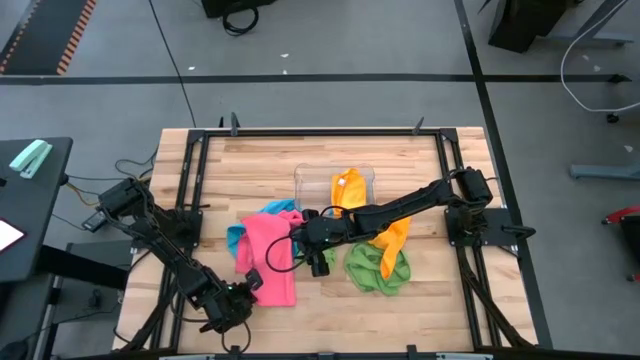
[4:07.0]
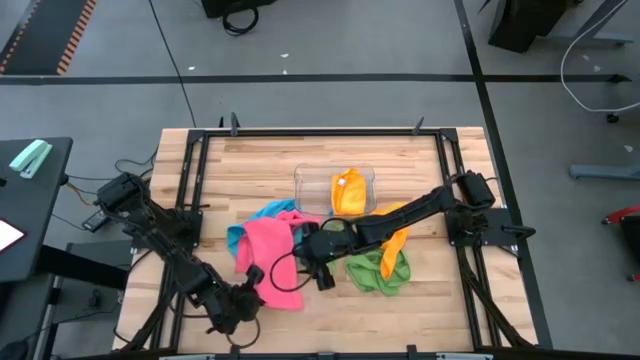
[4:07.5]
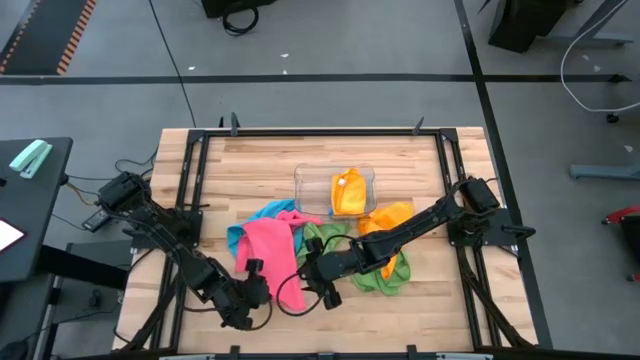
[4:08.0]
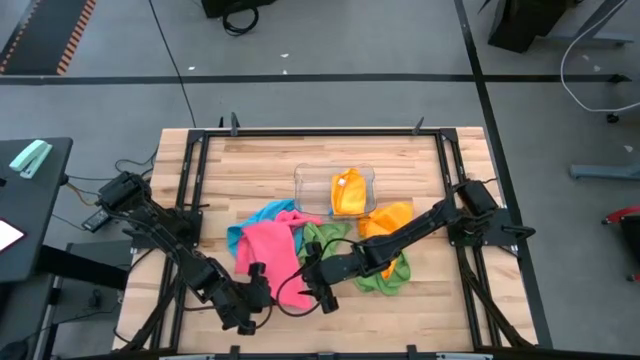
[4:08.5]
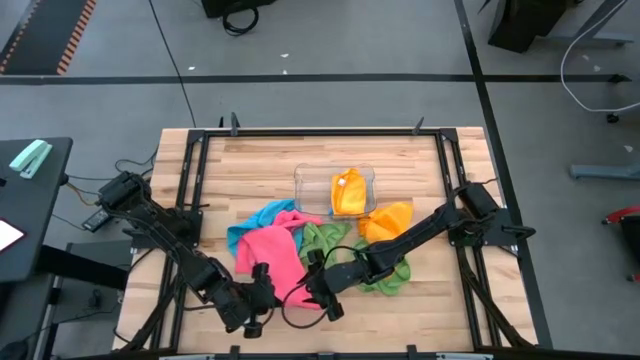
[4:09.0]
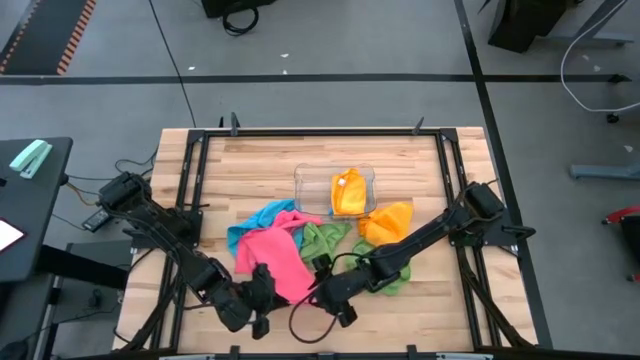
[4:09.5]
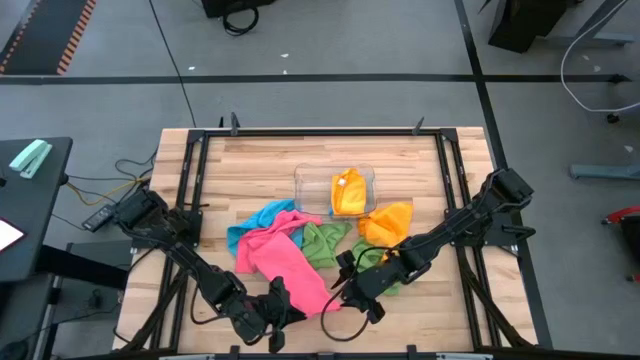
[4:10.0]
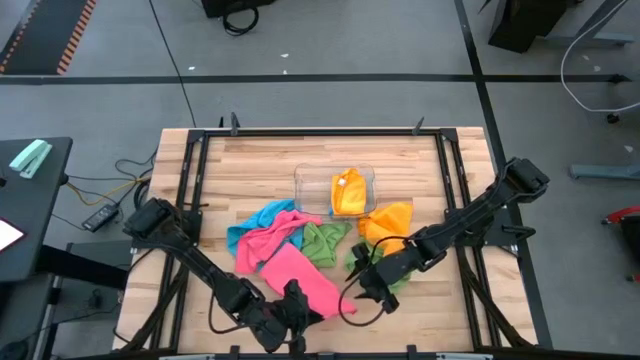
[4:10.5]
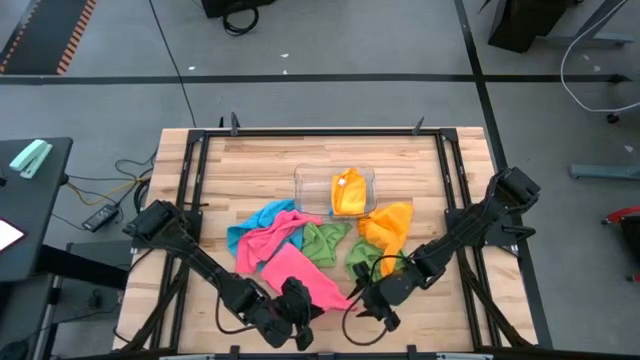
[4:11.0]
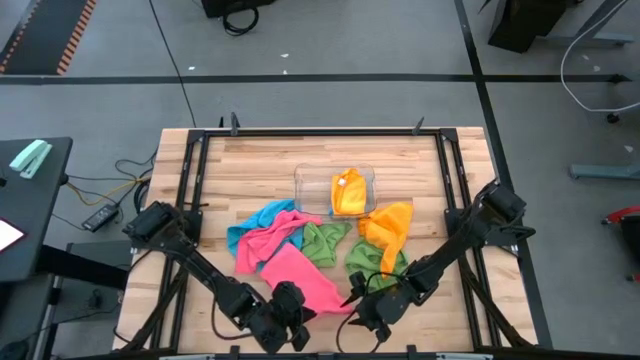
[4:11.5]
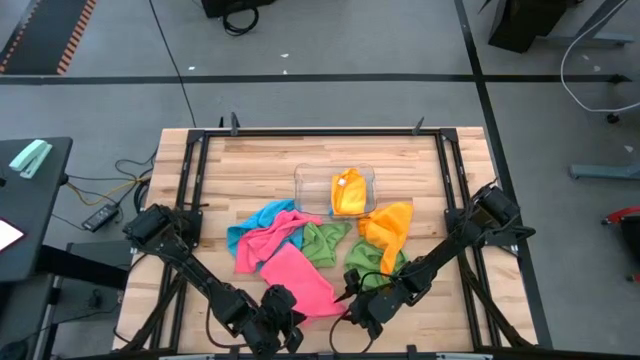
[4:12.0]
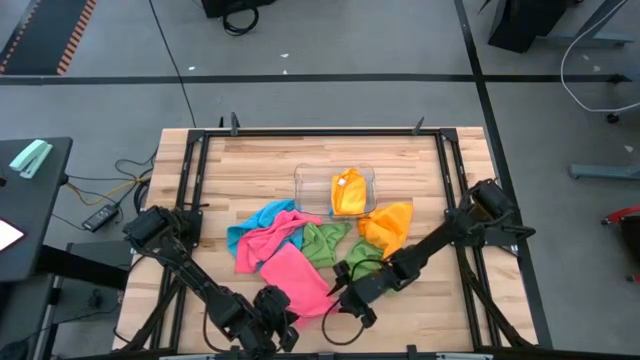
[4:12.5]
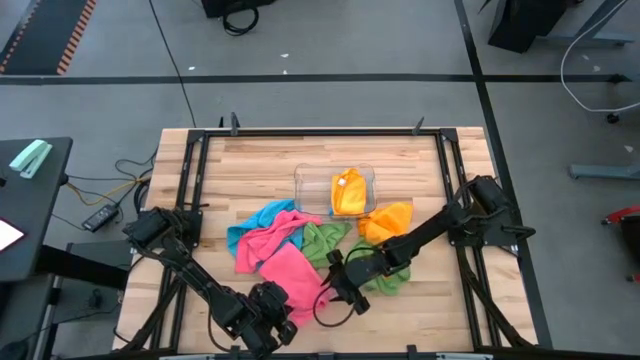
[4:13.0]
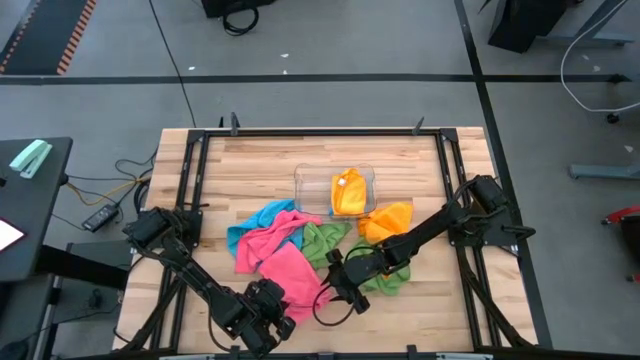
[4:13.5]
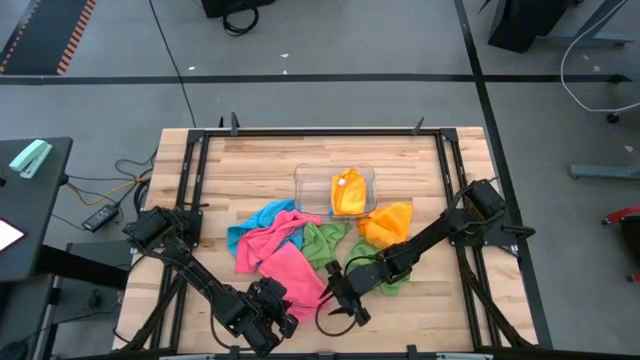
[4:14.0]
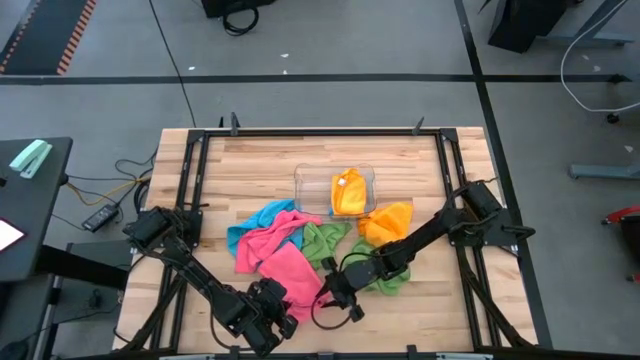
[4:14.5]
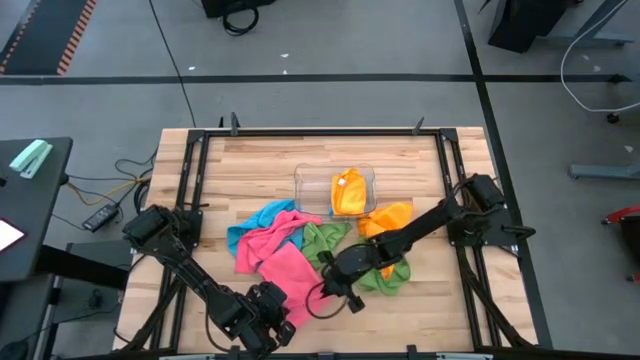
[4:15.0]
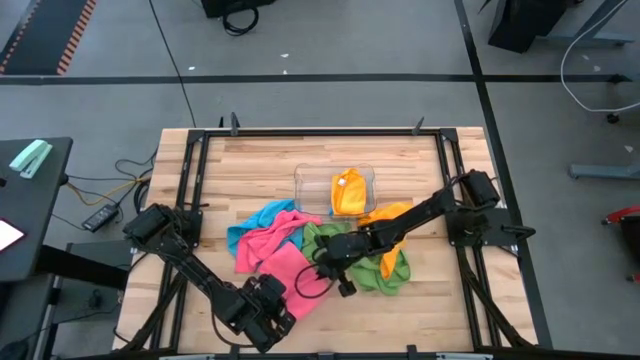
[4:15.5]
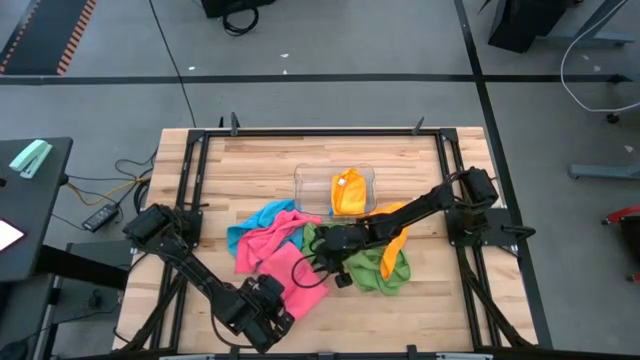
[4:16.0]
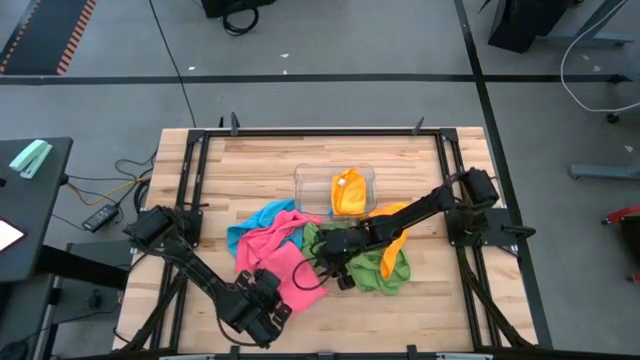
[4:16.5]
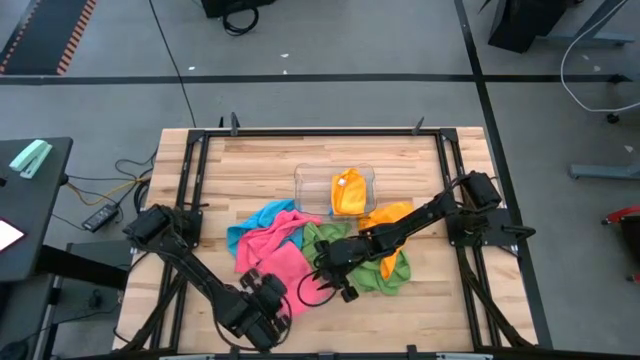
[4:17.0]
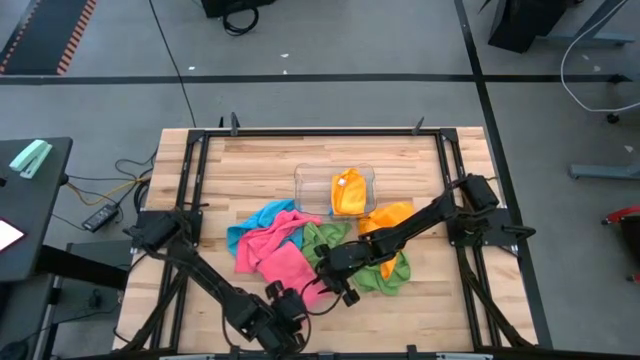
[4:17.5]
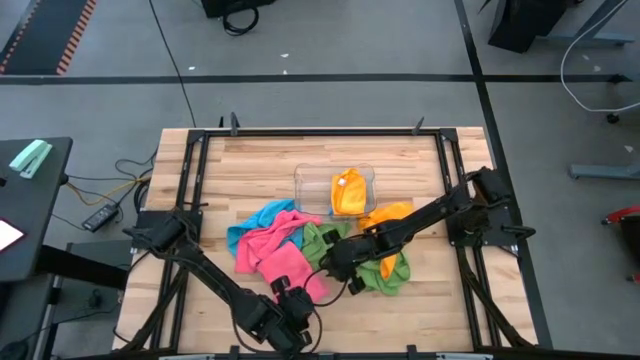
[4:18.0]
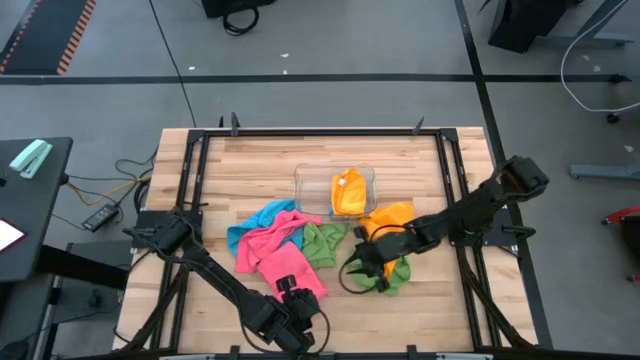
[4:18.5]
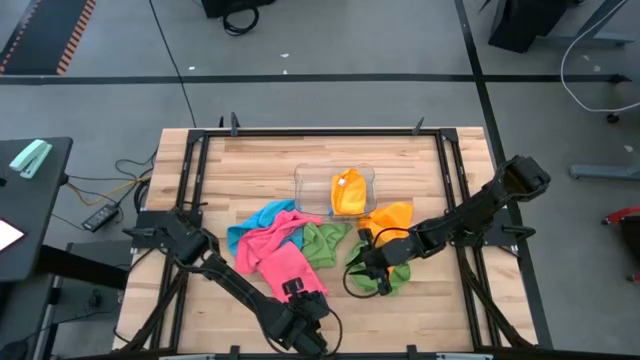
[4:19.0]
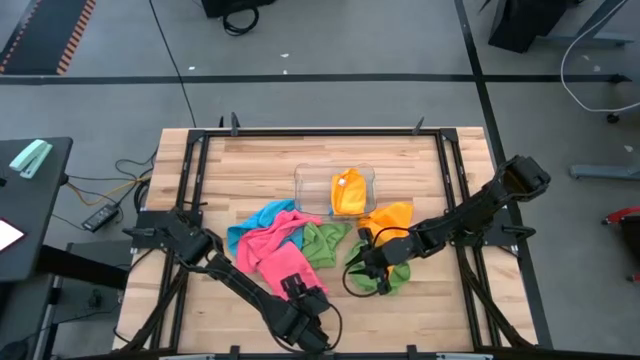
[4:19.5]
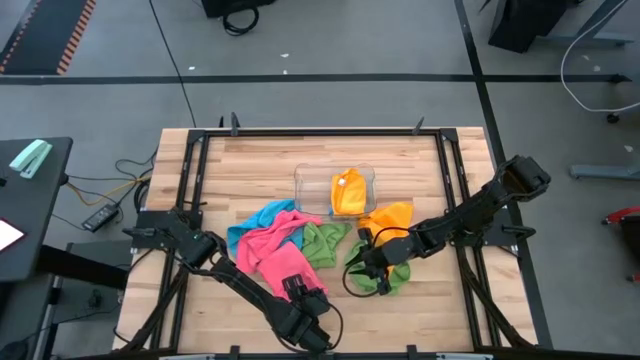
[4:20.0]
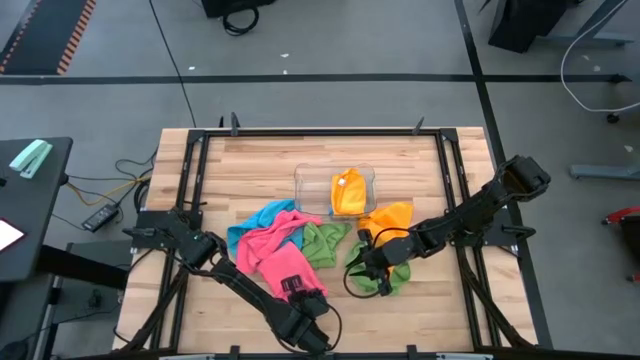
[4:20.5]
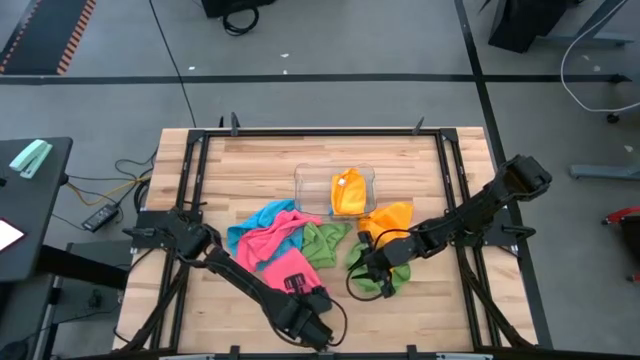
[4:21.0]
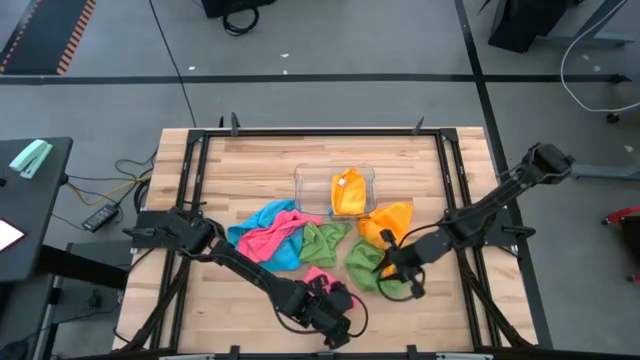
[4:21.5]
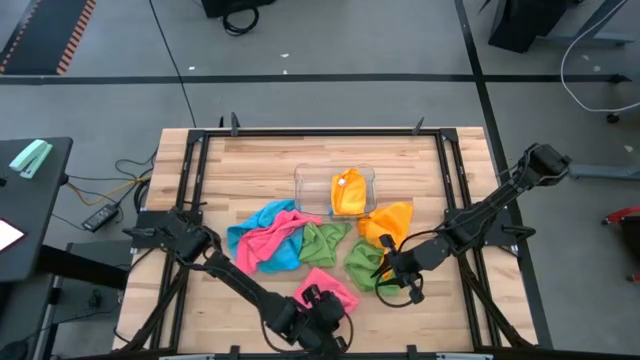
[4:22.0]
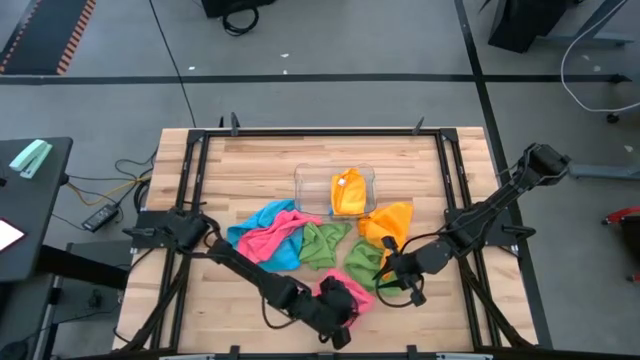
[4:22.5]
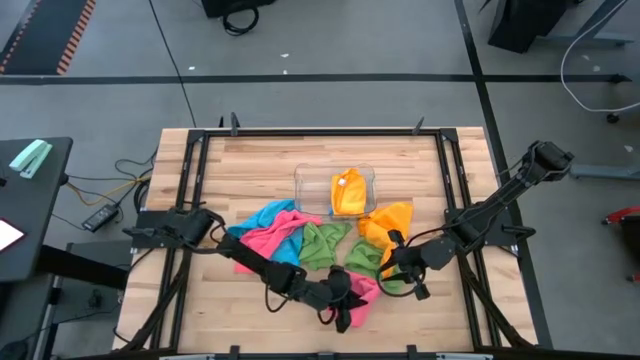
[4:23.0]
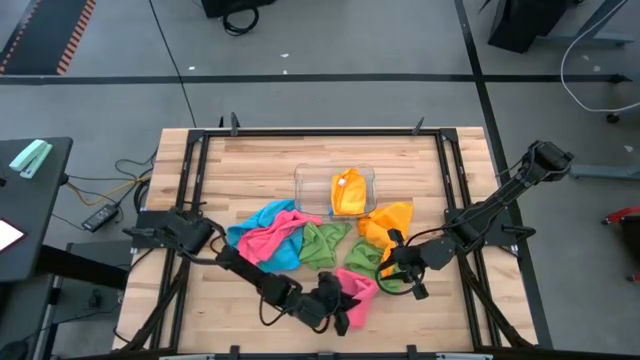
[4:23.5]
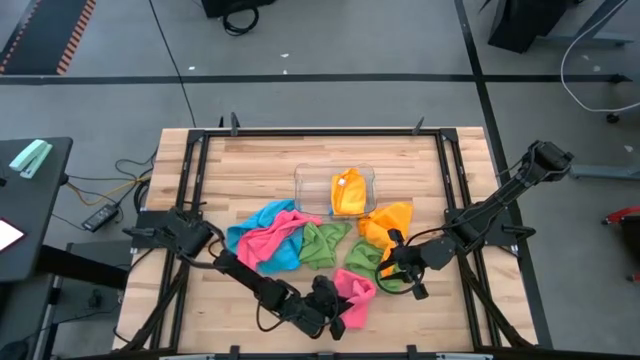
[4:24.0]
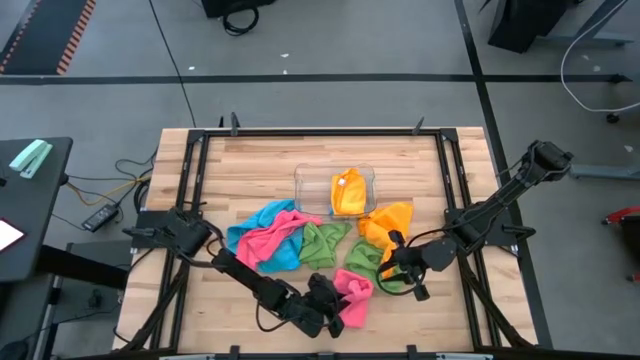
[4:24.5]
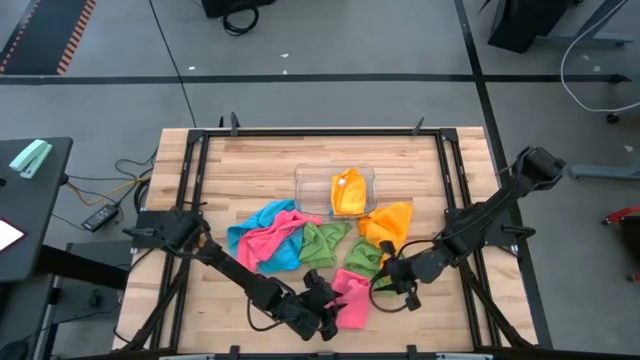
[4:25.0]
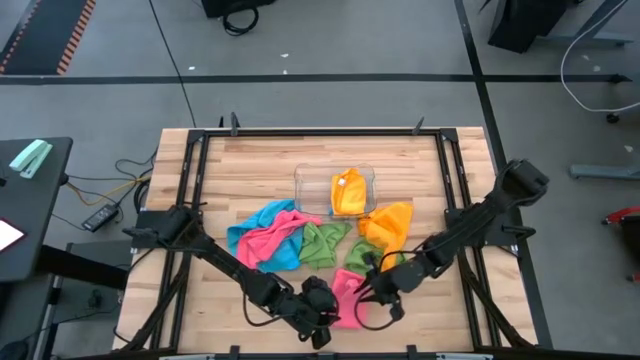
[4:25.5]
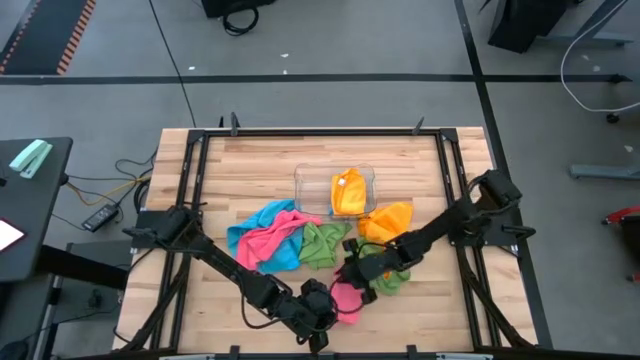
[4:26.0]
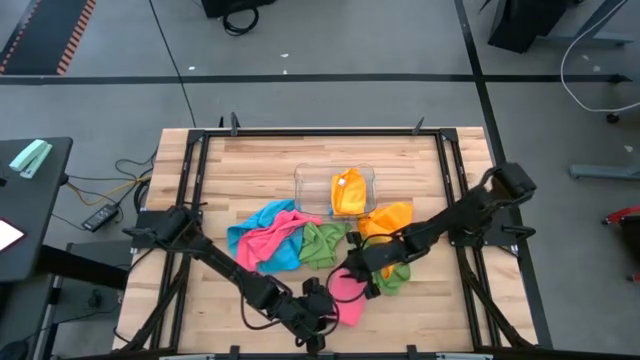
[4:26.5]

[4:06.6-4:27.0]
Task: Fold microfiber towels
Fold the bottom pink microfiber cloth

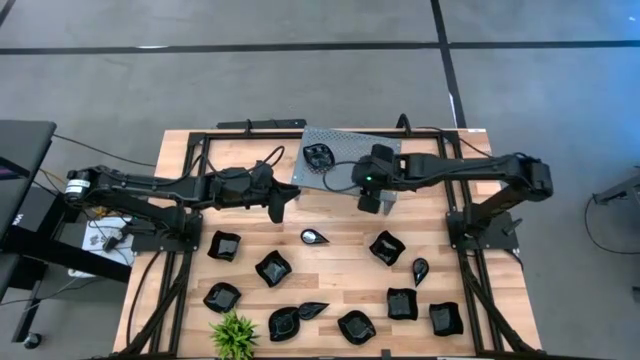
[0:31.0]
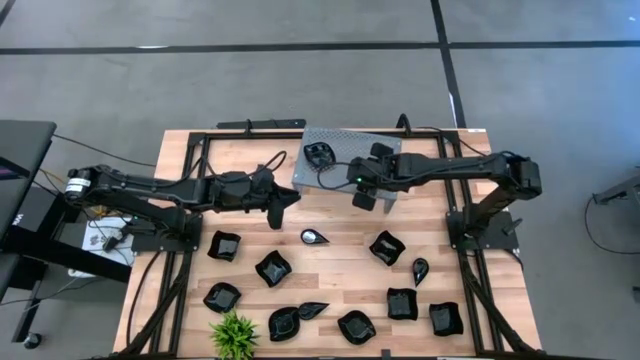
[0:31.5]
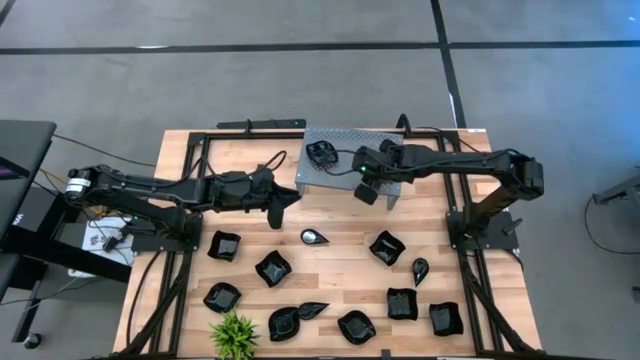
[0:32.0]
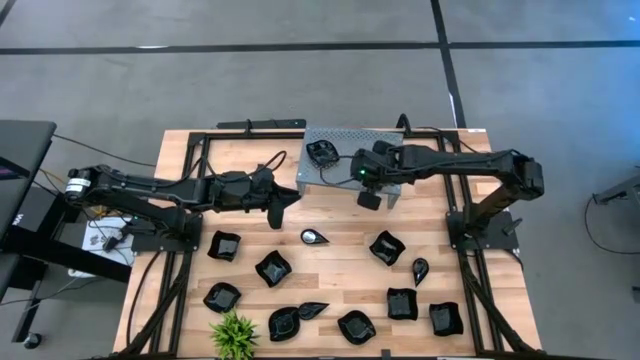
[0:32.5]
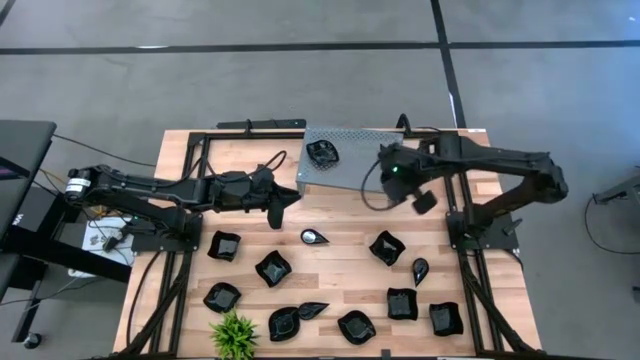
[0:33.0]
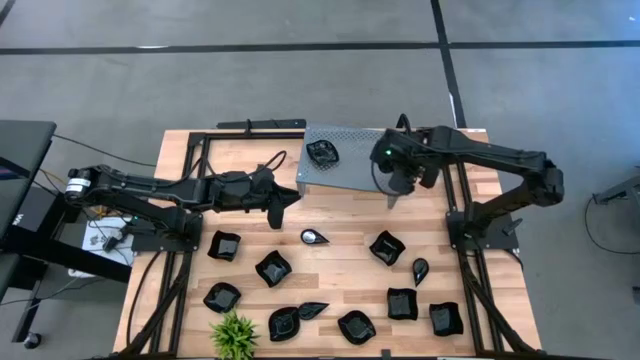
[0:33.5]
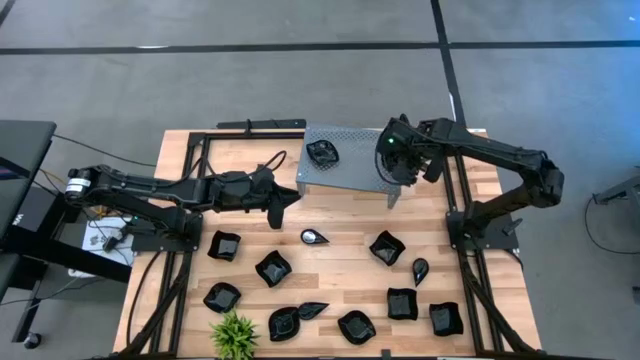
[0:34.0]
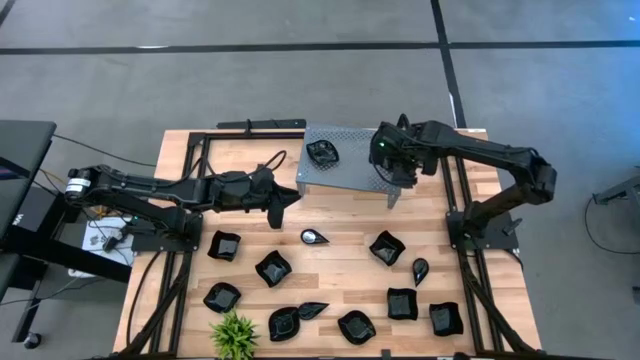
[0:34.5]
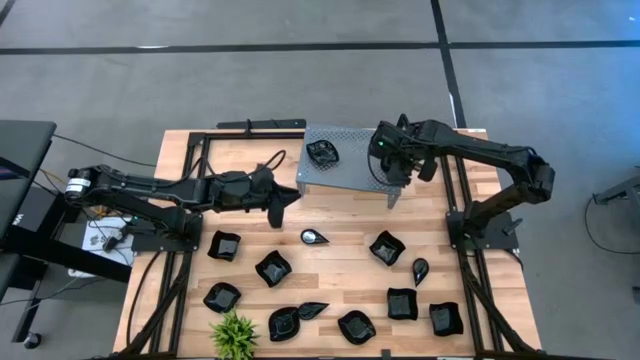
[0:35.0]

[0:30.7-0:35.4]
Task: Pick & Place Mini shaped plates
Stack the black drop-shaped plate on the other drop-shaped plate on the shelf
